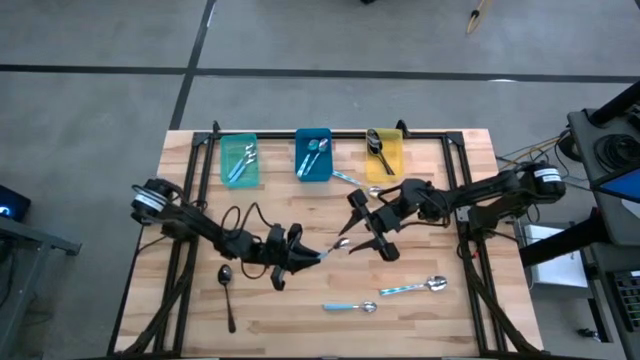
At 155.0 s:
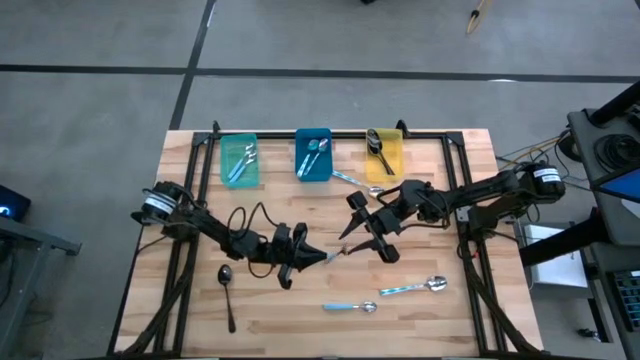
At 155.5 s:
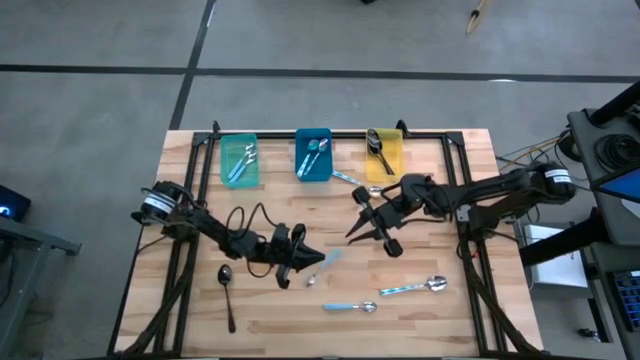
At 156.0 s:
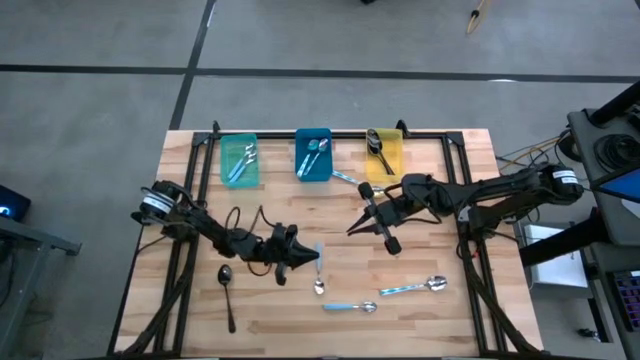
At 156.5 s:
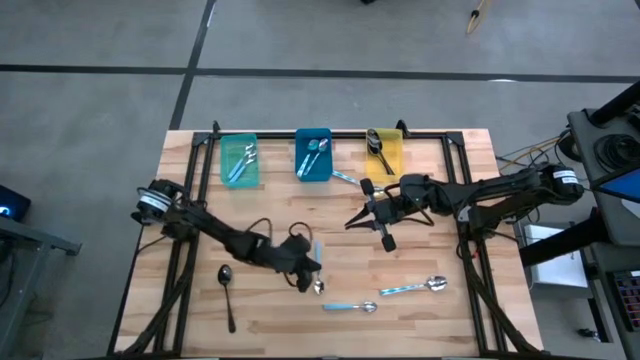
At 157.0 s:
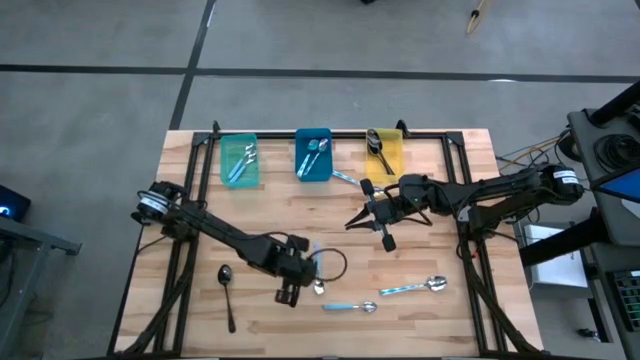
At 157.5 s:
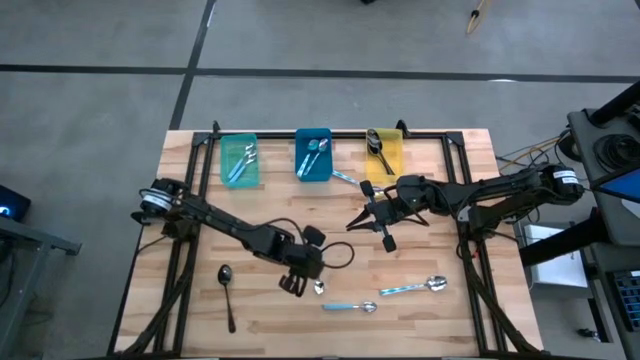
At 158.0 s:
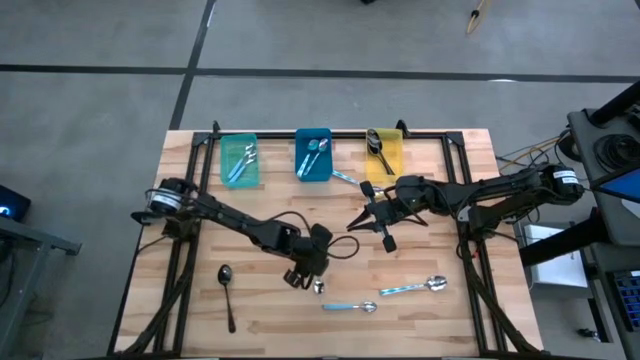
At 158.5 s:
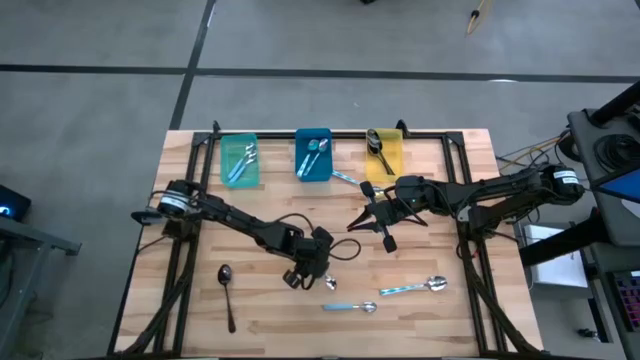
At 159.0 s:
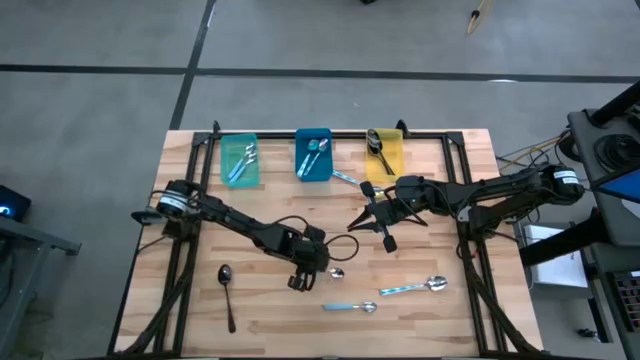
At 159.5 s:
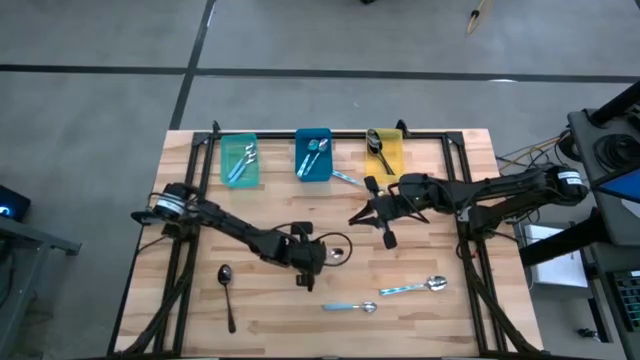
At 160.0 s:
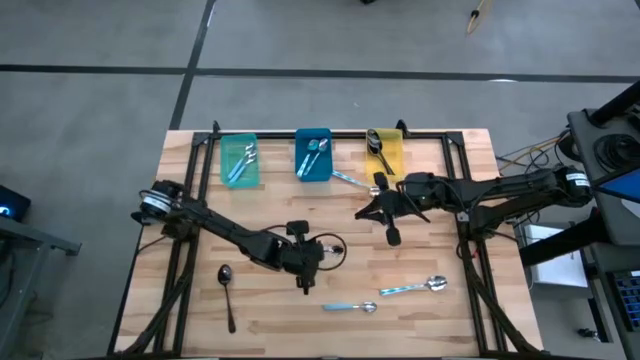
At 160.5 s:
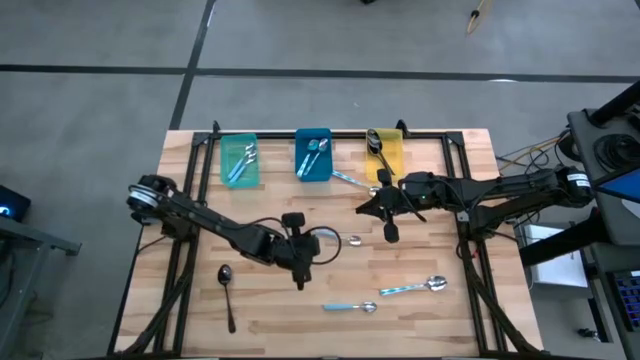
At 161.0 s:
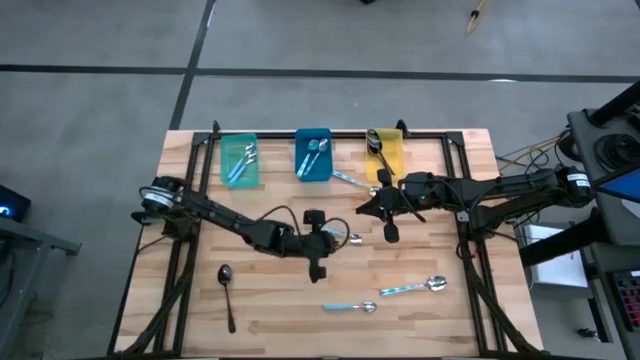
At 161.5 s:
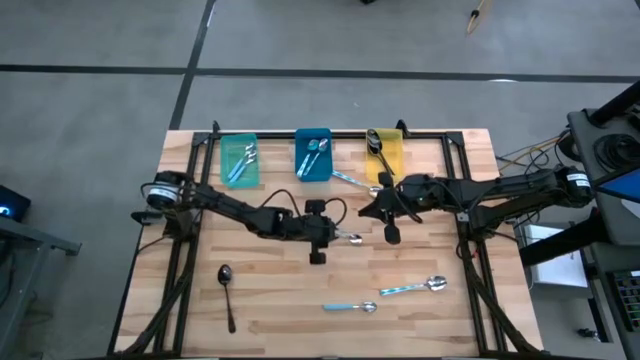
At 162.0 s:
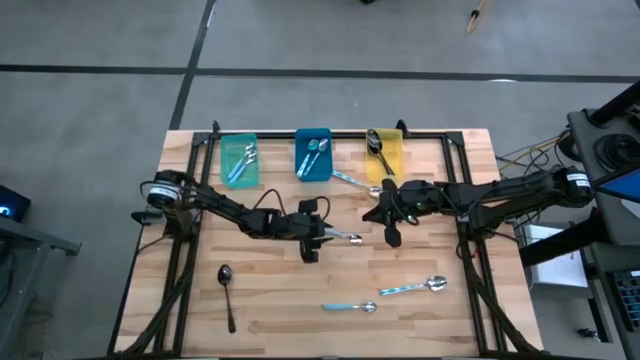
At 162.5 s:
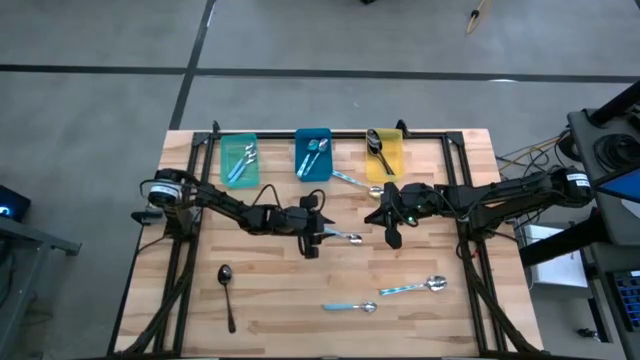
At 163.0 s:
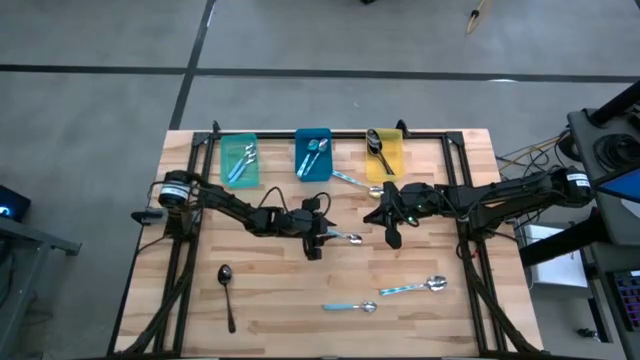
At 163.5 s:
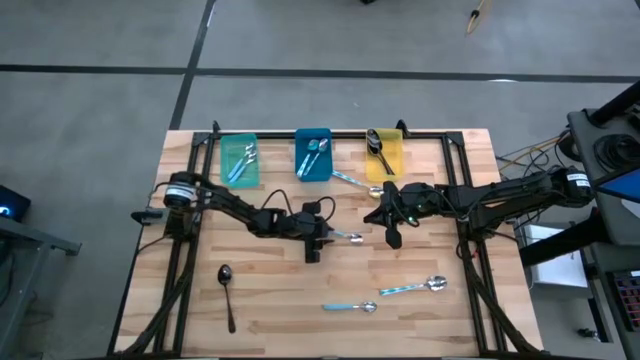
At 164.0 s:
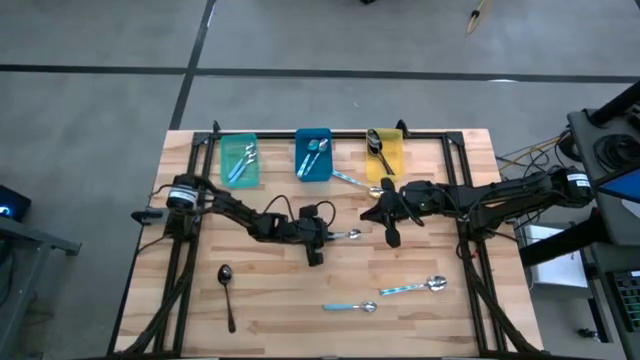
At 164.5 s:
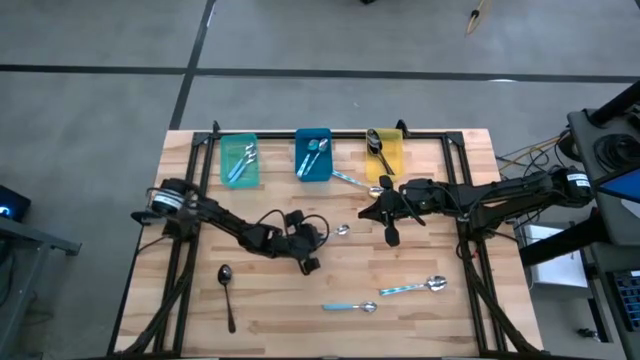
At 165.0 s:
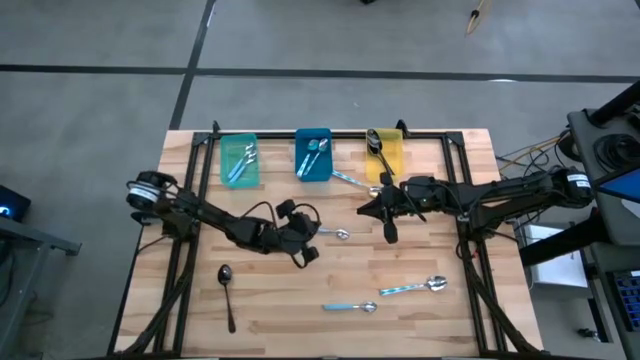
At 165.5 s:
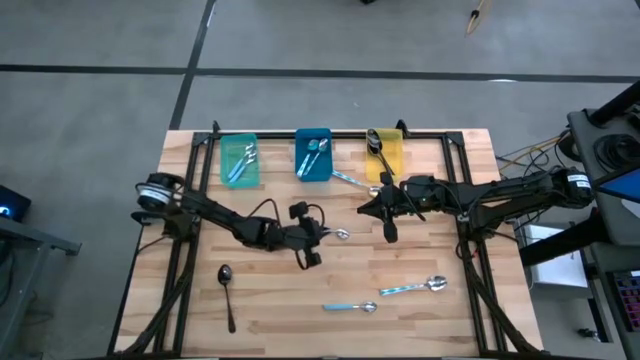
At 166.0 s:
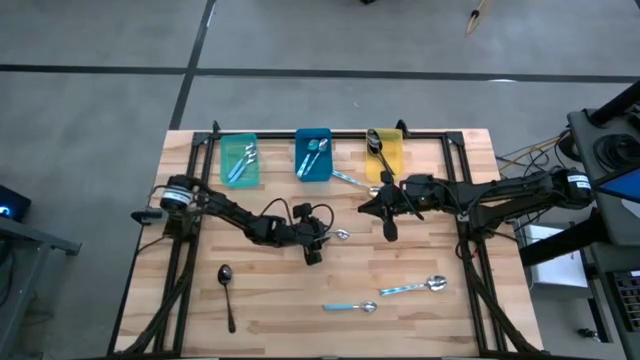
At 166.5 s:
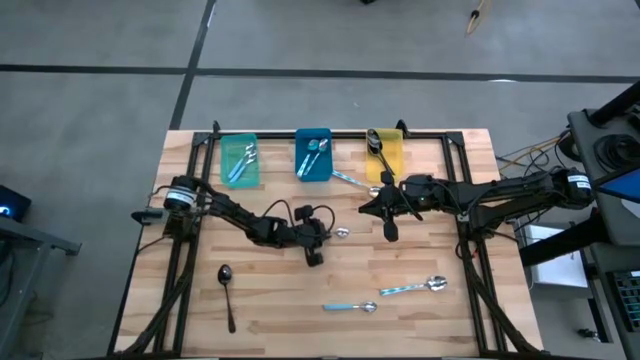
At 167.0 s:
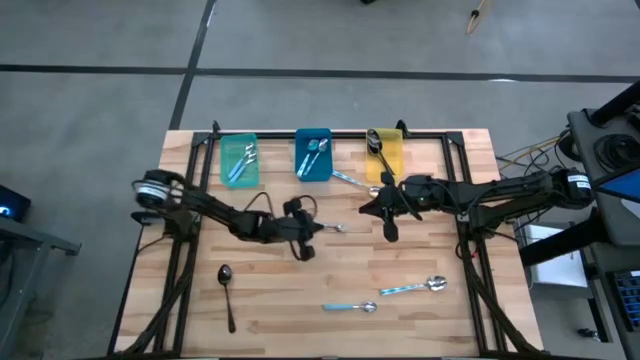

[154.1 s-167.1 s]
Task: Sort silverware by color (type)
Put the blue spoon into the green bin

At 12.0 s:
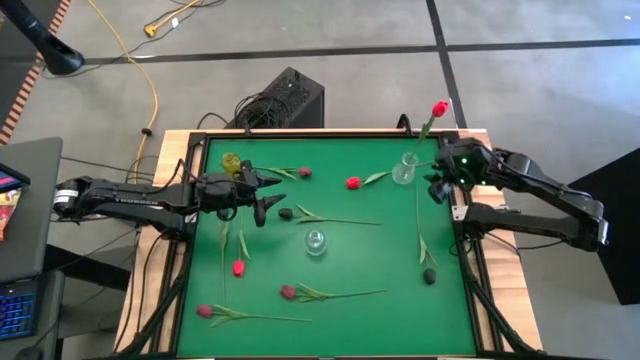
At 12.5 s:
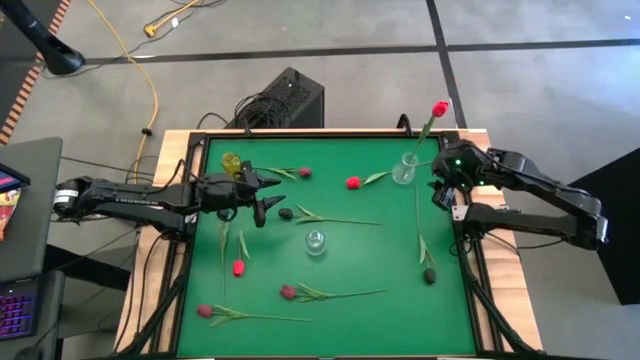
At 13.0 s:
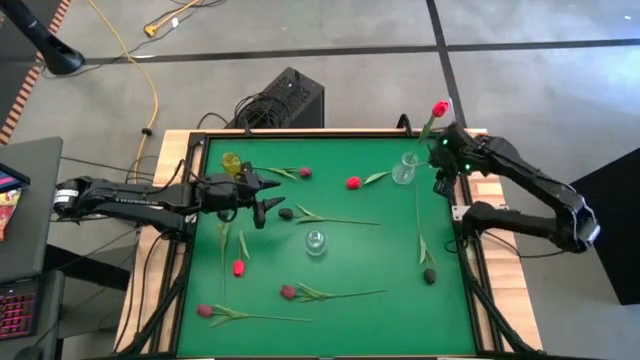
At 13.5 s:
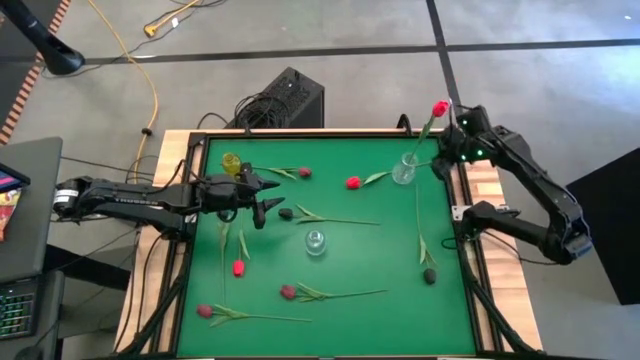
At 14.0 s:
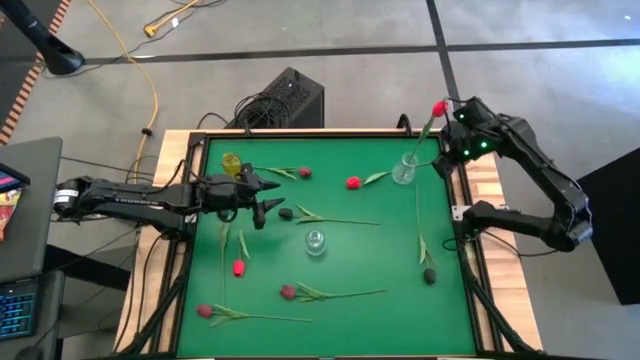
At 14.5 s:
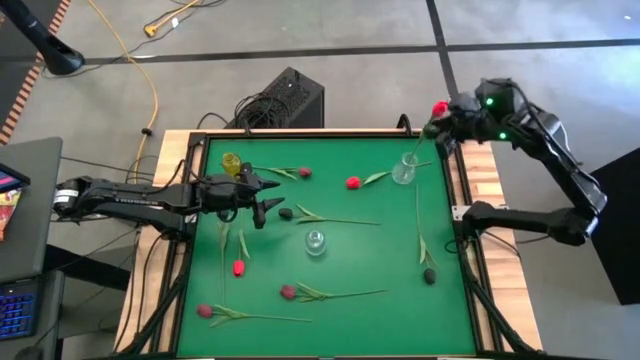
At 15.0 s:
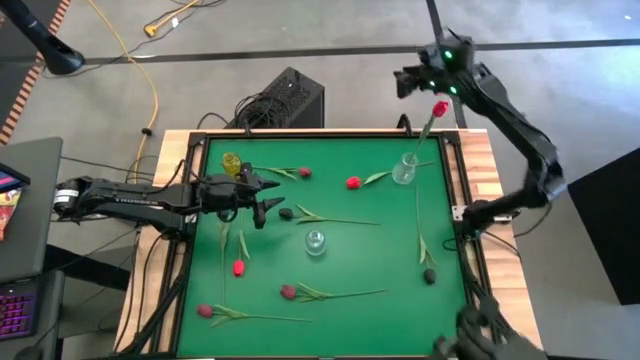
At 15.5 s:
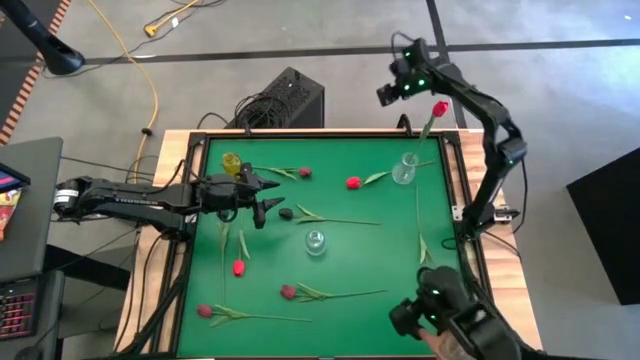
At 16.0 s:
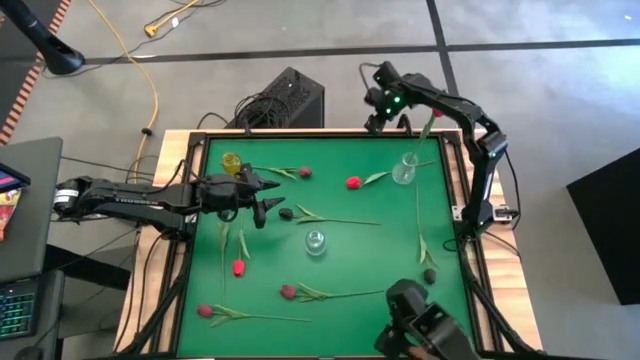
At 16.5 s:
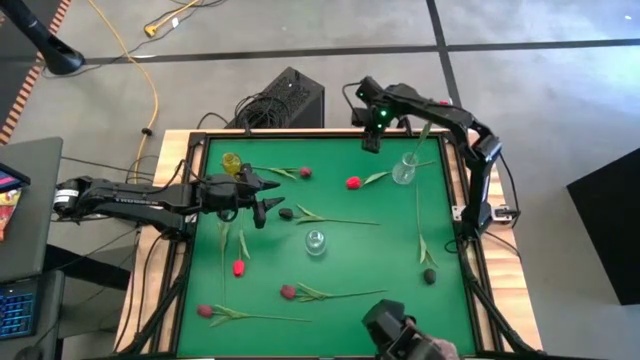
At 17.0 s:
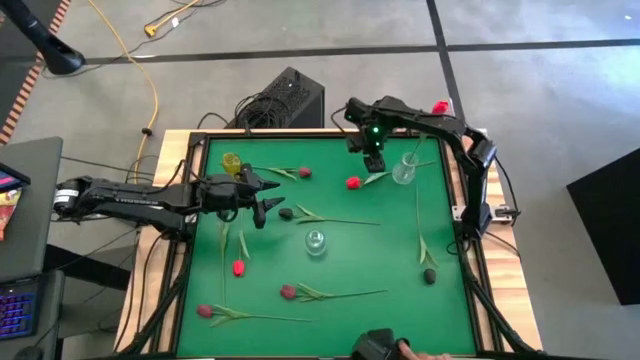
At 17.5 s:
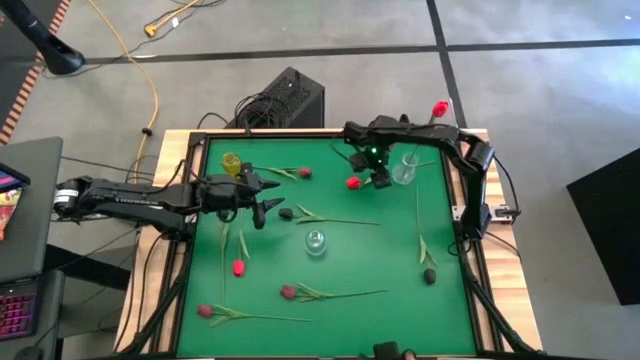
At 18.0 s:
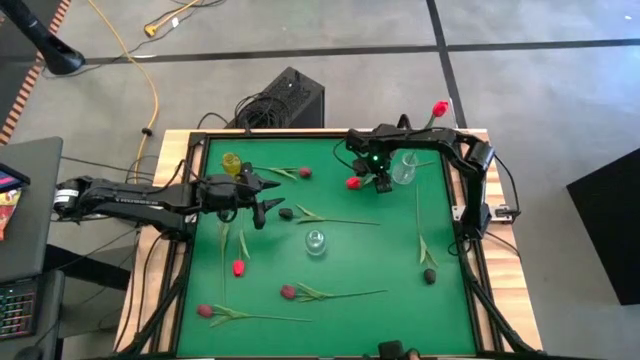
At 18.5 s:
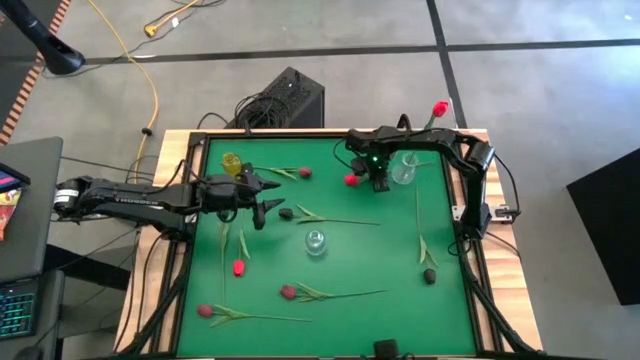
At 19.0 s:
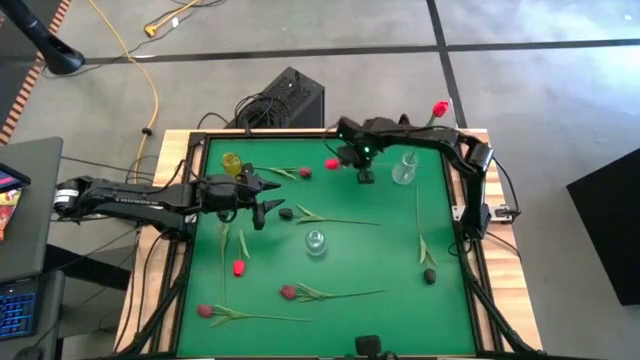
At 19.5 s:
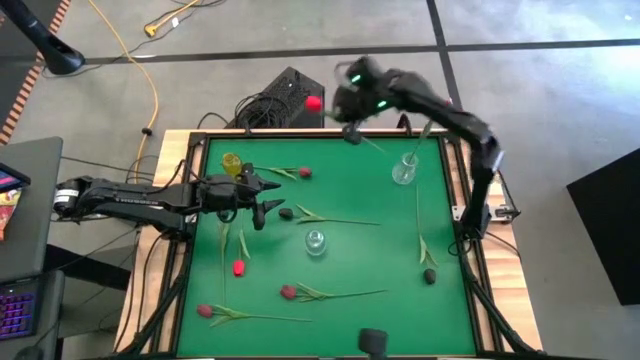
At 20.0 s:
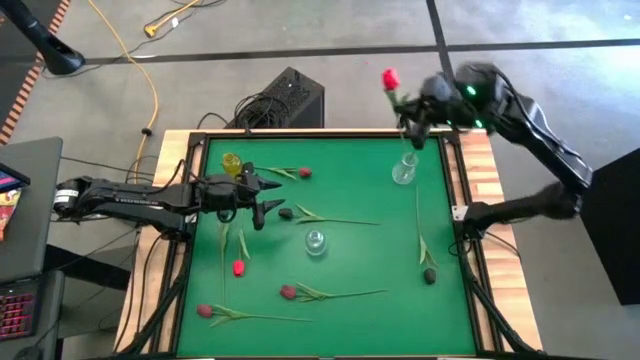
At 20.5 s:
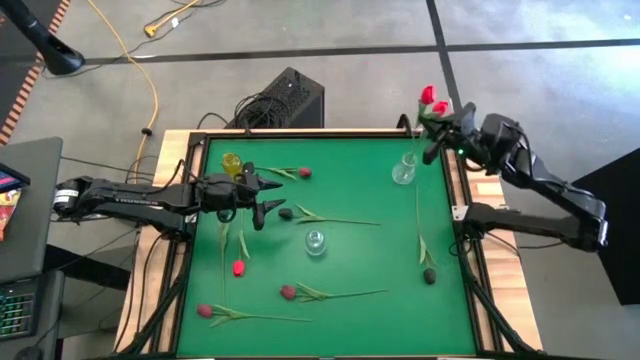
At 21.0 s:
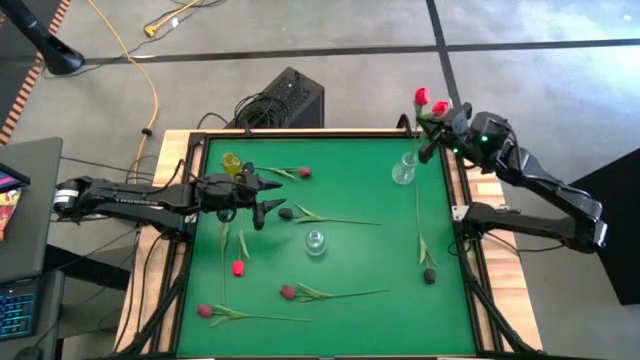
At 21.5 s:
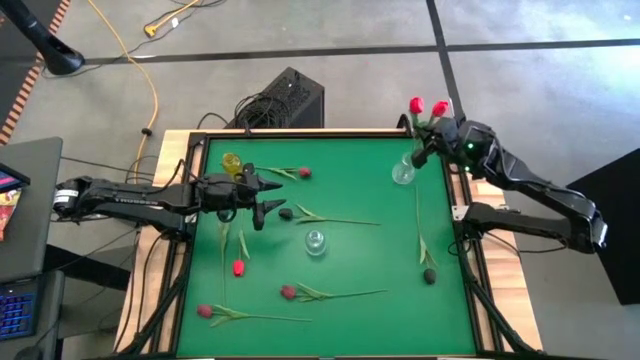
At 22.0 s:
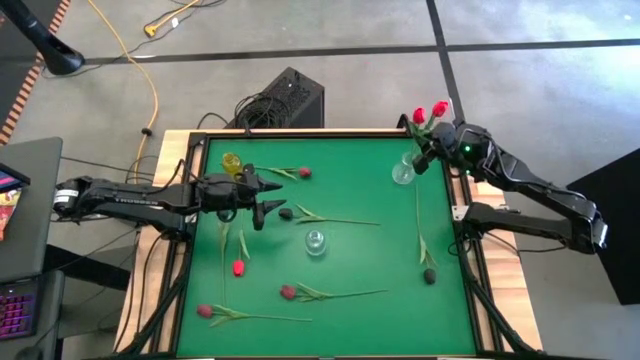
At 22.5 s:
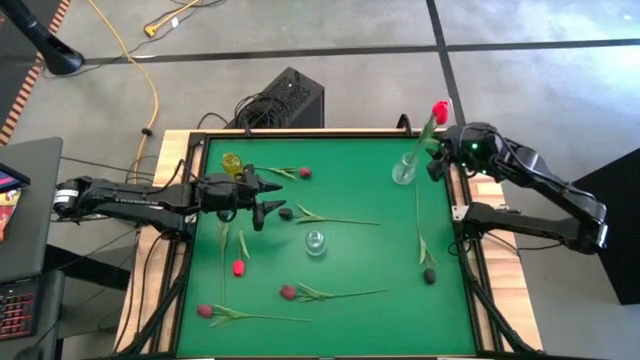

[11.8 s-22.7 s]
Task: Sort flowers into vase by color
Put the top red tulip into the right transparent vase
